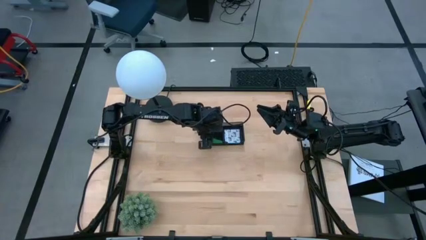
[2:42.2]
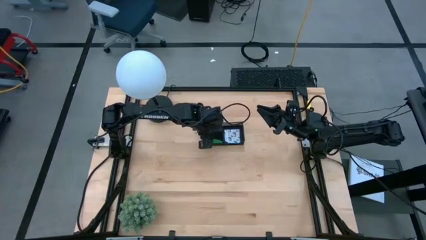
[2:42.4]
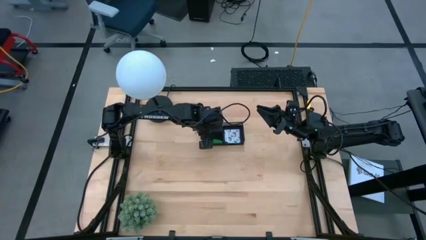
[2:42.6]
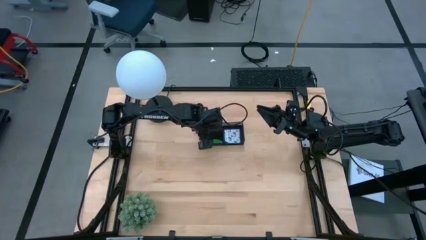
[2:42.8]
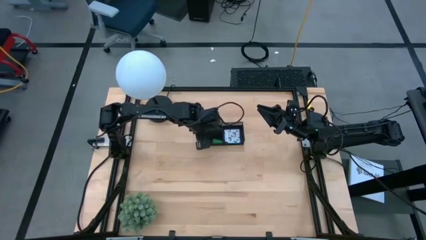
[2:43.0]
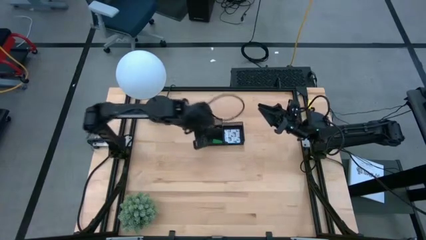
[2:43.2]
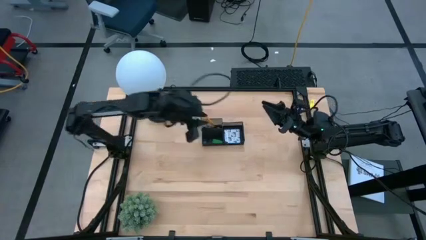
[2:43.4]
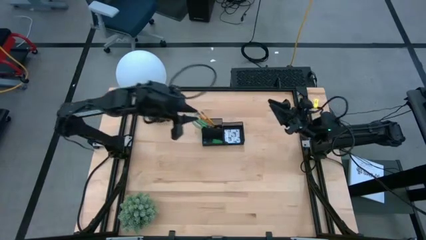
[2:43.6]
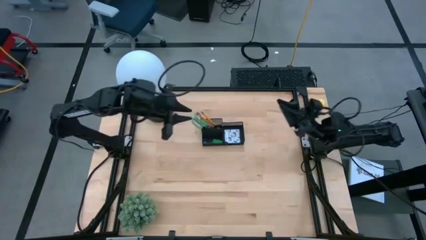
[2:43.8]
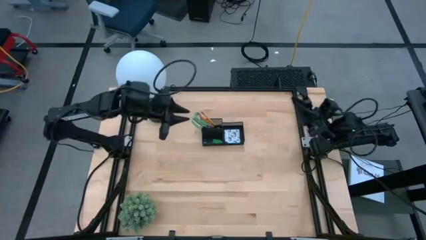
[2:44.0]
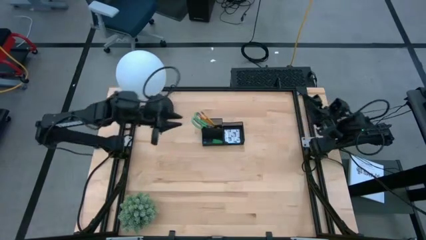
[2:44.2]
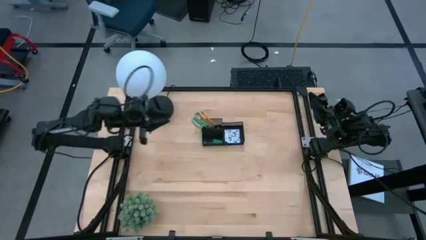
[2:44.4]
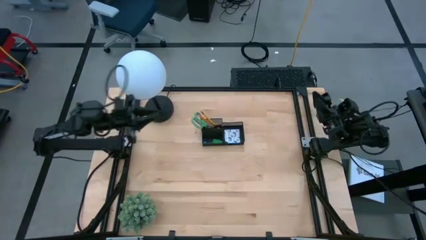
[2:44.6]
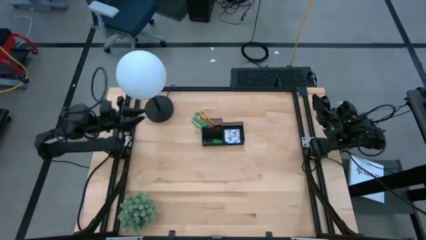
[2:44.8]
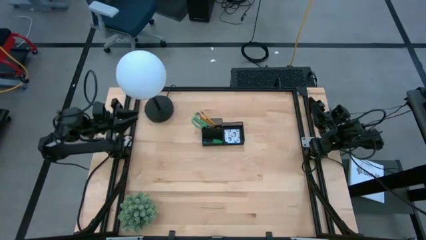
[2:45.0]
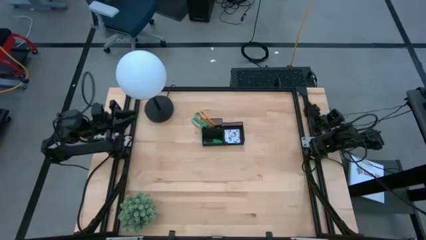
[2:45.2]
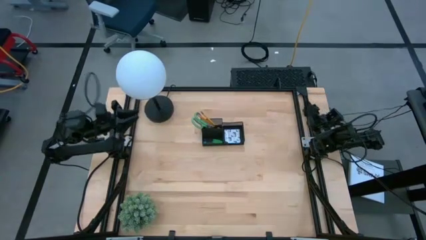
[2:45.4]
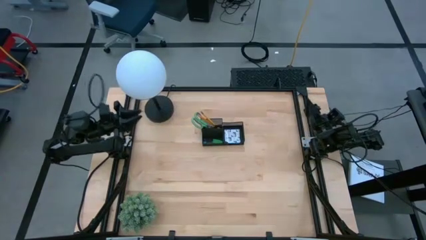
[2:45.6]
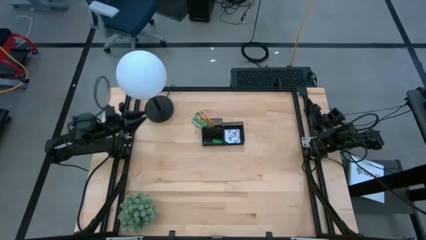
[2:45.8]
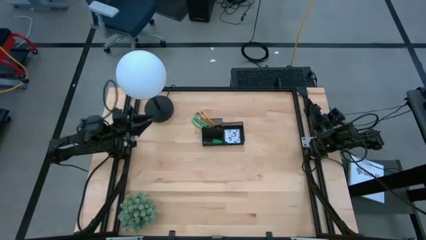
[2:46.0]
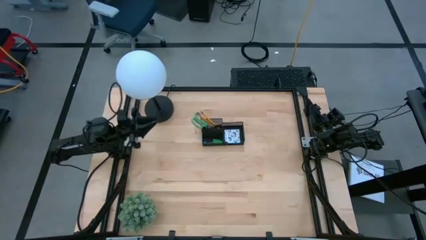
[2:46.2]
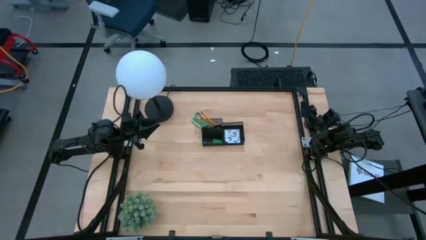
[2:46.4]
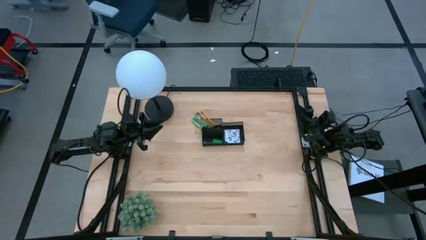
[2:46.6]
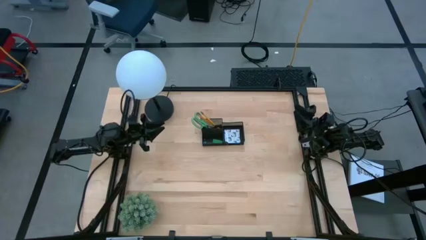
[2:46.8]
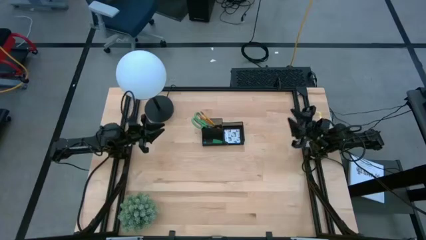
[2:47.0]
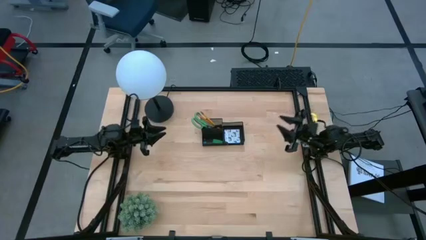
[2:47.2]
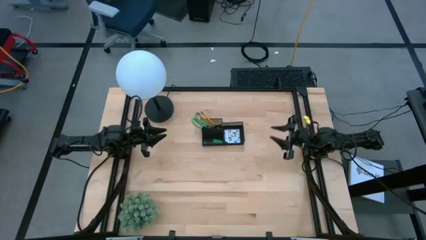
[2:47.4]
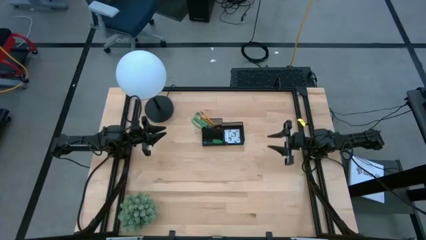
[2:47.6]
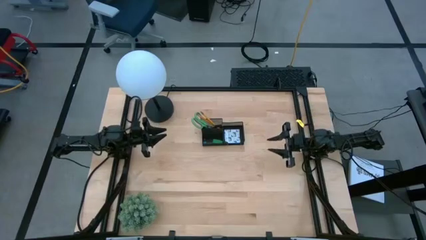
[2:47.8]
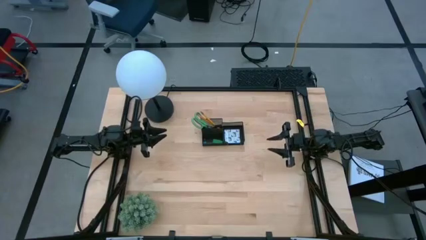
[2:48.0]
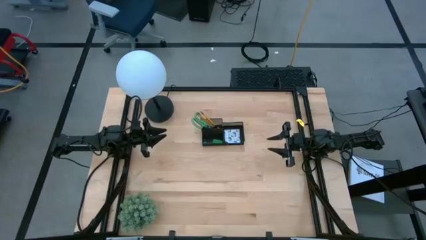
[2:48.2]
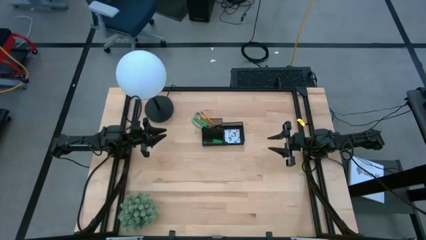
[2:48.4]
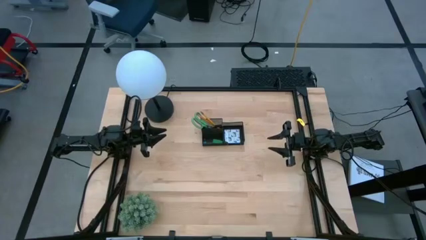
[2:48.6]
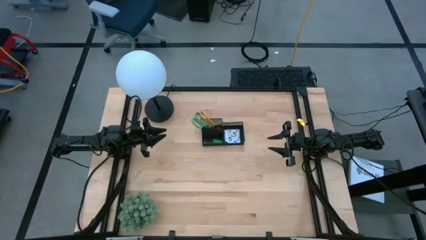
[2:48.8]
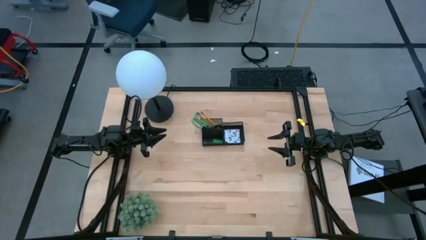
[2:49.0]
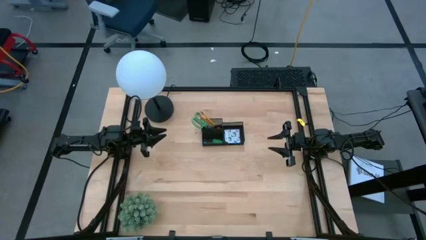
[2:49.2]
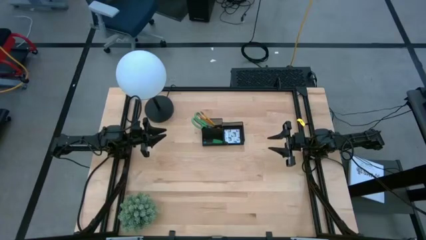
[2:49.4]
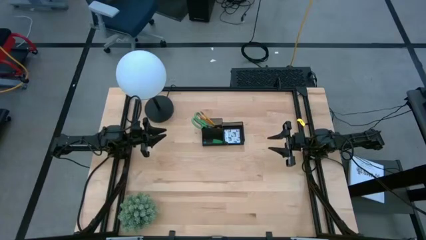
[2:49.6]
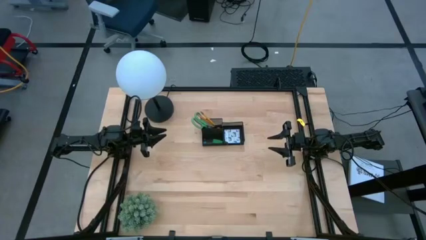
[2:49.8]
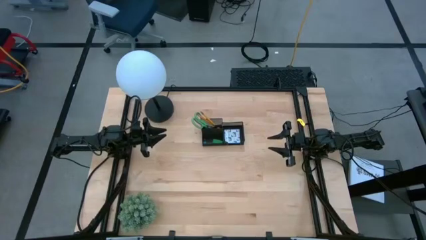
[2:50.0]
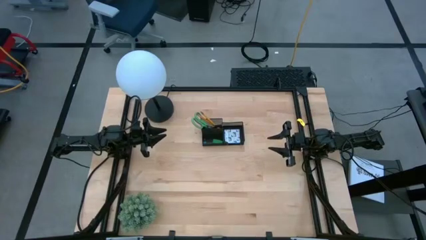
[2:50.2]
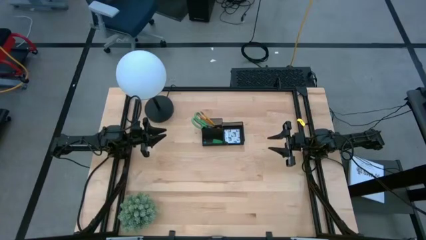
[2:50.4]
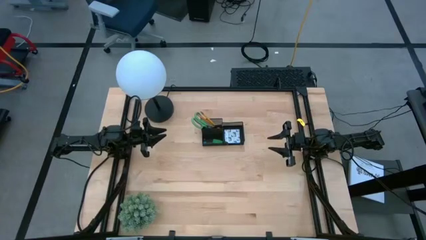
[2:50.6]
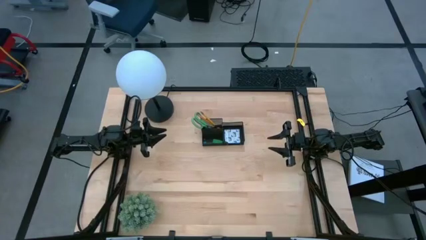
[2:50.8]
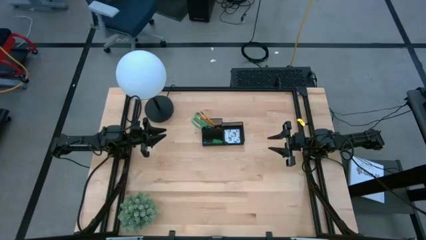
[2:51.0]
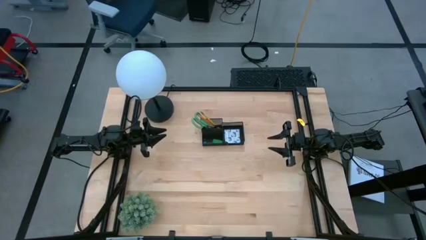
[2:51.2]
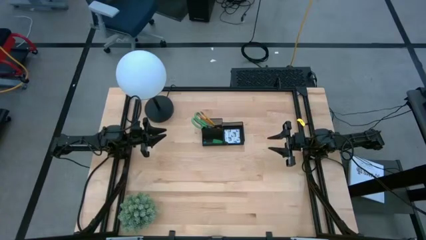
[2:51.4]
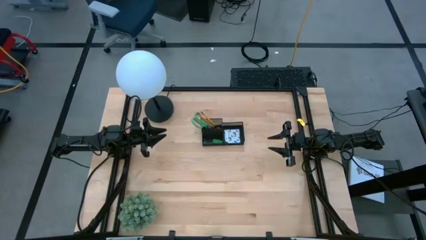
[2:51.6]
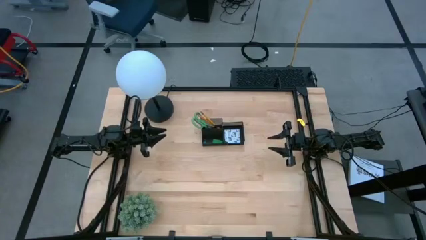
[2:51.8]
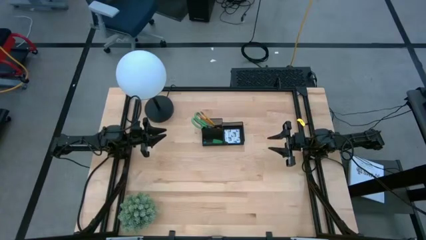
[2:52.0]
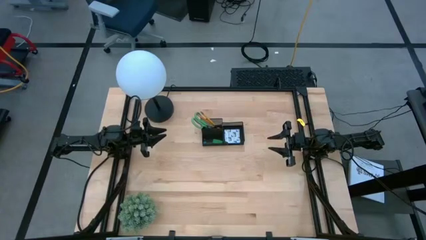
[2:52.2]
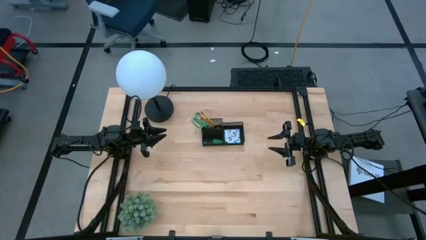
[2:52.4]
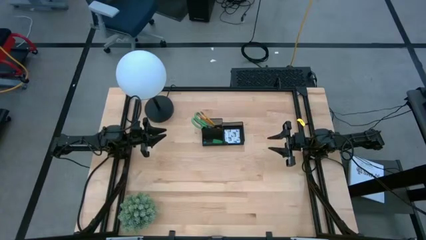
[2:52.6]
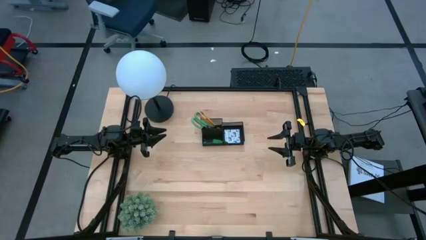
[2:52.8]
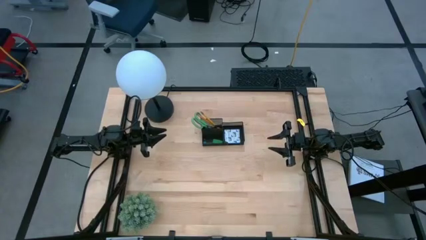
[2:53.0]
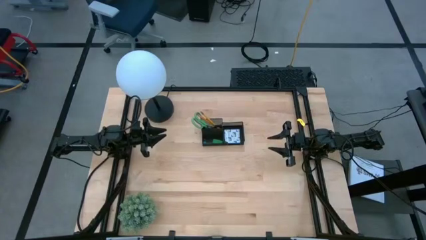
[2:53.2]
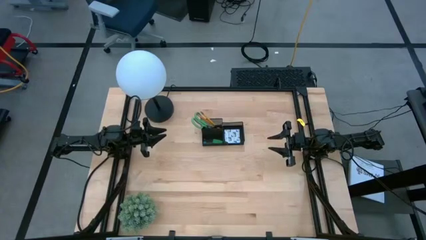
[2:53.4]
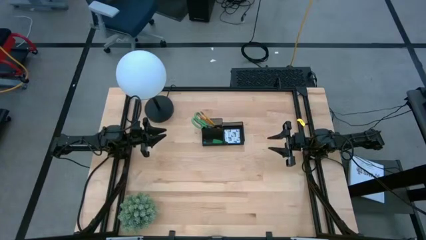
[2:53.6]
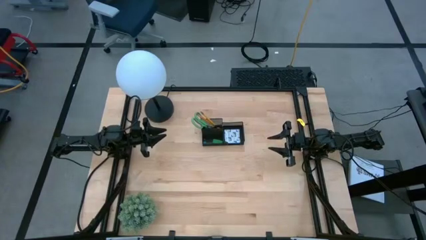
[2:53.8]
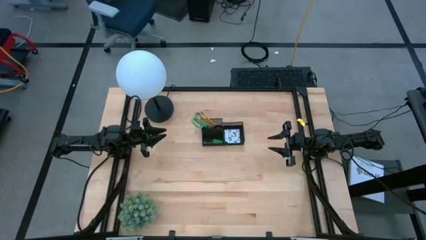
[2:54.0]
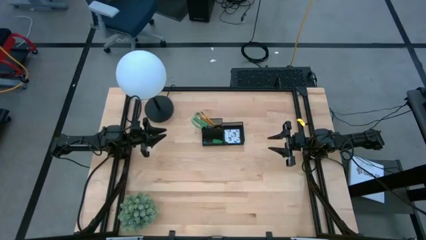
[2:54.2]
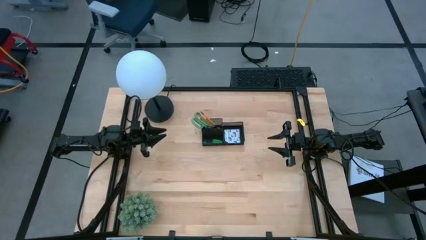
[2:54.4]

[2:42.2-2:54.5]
Task: Pick and place office supplies into organizer
Return to Home Position

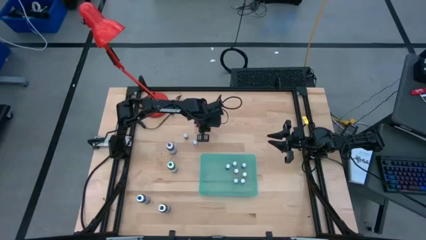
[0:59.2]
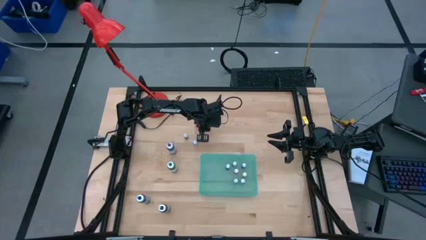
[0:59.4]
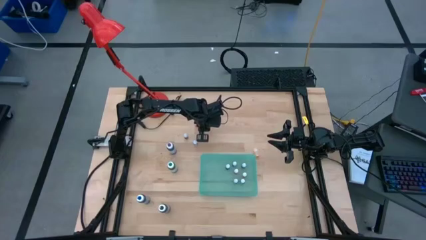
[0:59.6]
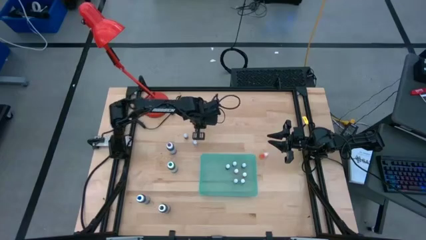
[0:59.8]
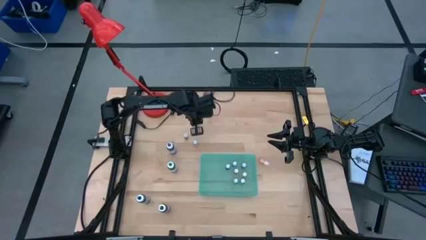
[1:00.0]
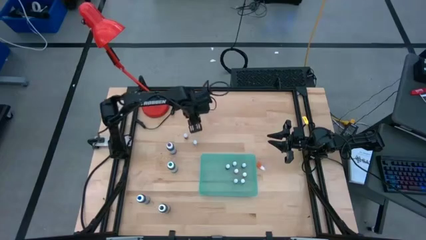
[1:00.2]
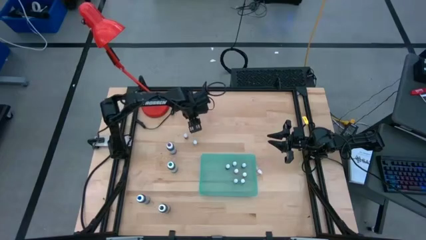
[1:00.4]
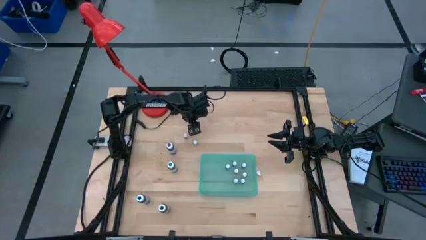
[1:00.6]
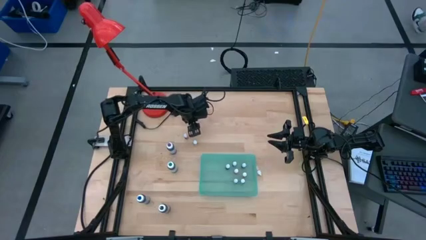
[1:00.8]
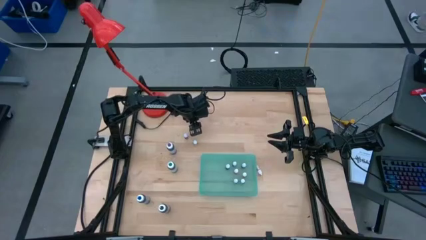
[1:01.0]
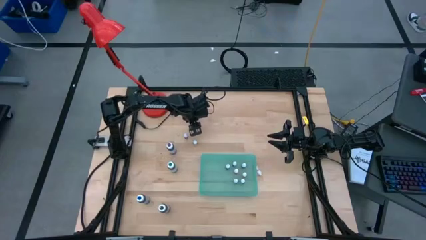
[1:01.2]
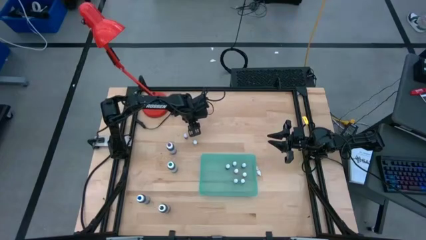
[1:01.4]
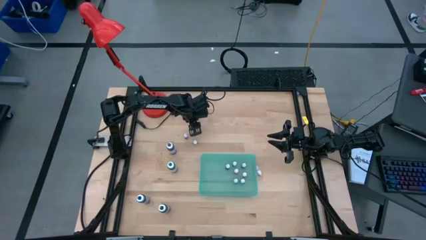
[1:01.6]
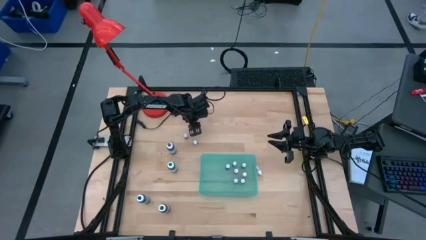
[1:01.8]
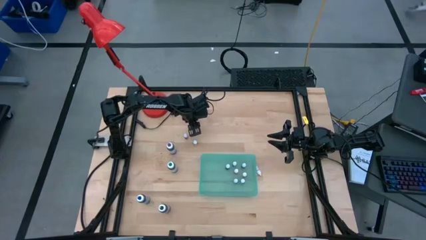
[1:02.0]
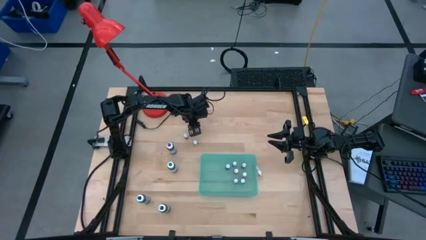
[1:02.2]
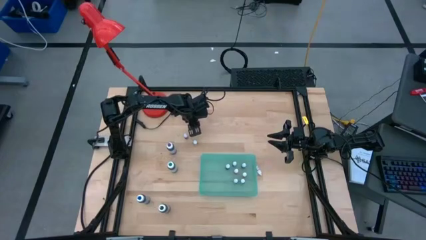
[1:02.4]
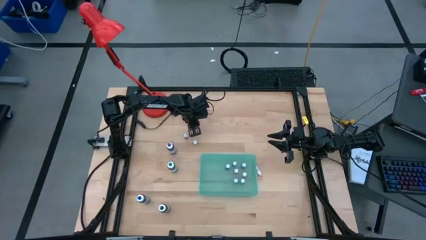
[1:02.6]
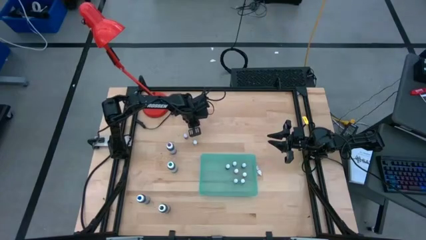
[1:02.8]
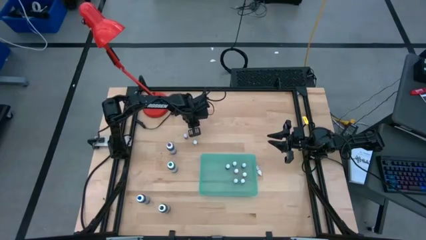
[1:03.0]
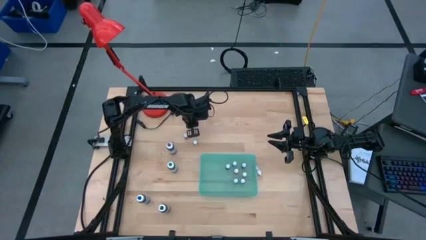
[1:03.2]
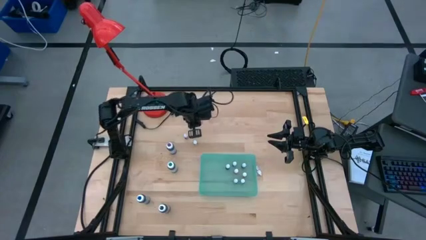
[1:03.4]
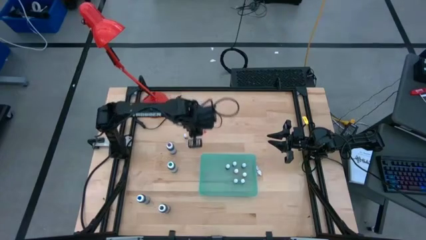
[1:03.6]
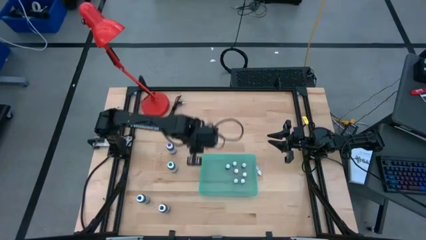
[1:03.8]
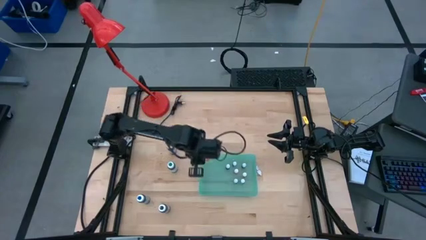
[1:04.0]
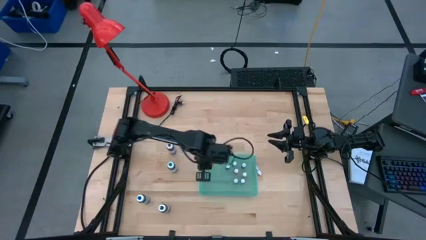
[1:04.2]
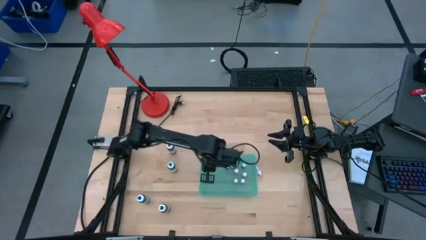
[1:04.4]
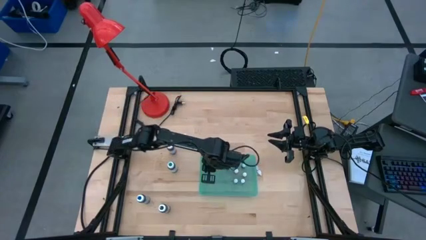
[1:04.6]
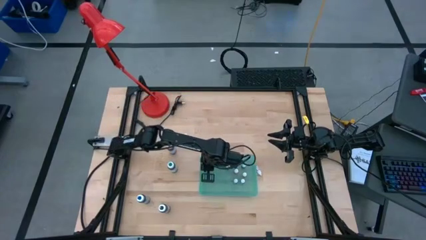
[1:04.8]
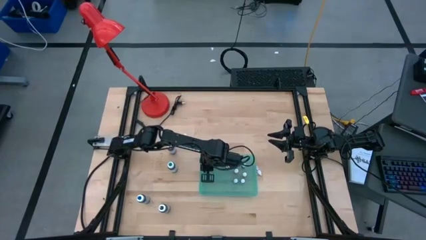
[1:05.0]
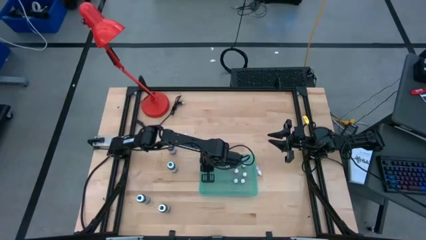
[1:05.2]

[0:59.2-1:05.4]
Task: Pick & Place food coloring
Put the small orange food coloring bottle into the green bin
